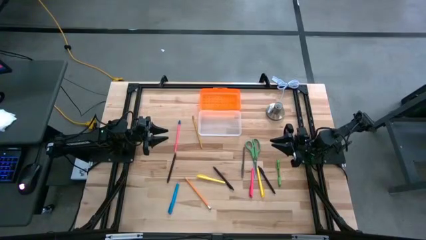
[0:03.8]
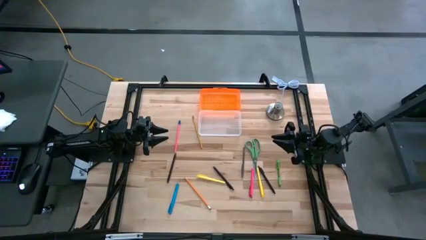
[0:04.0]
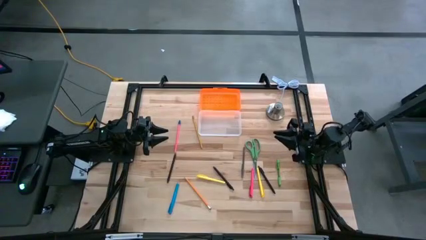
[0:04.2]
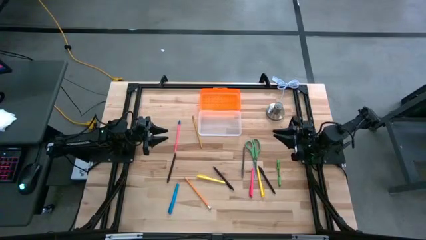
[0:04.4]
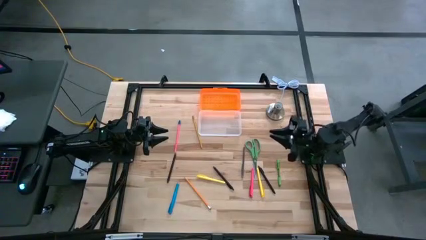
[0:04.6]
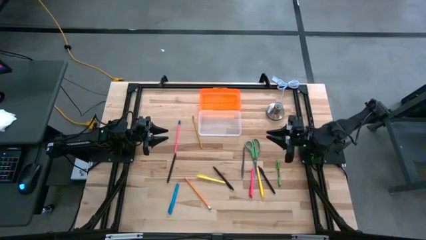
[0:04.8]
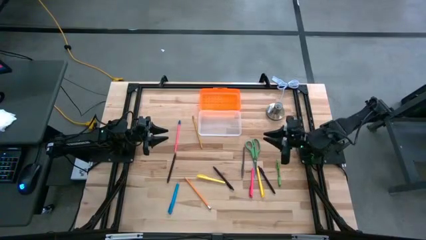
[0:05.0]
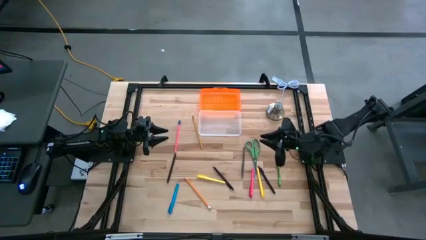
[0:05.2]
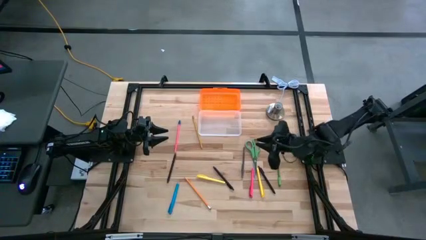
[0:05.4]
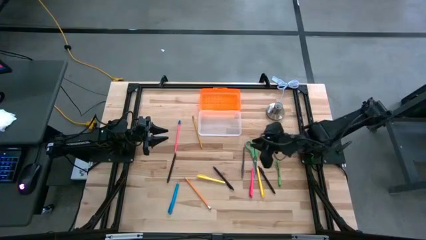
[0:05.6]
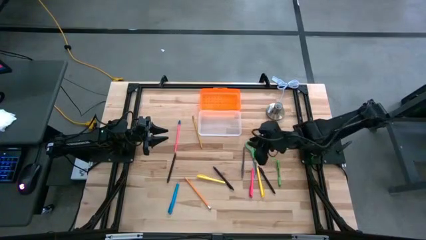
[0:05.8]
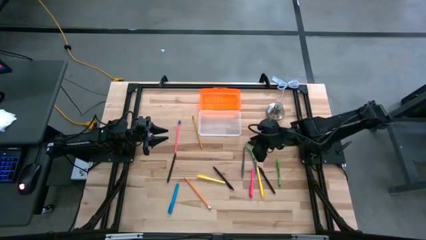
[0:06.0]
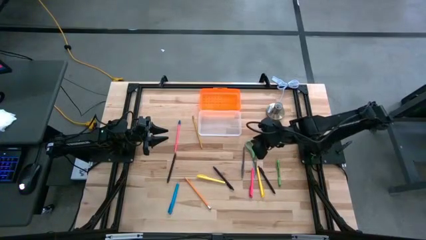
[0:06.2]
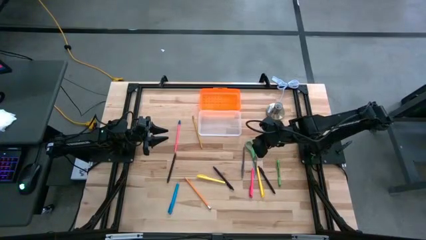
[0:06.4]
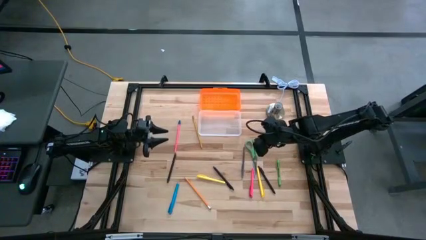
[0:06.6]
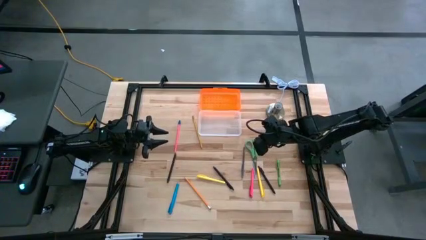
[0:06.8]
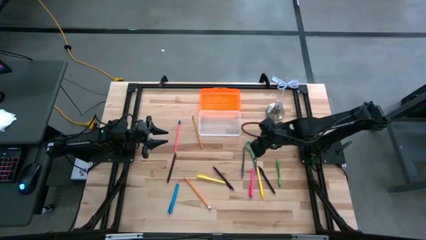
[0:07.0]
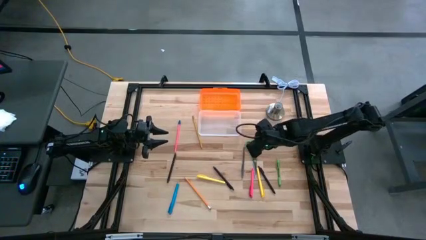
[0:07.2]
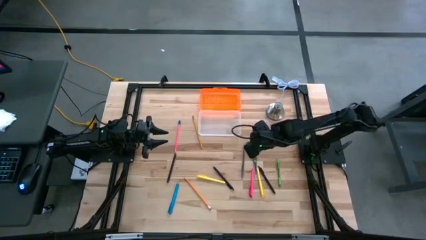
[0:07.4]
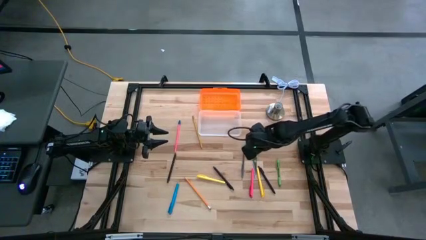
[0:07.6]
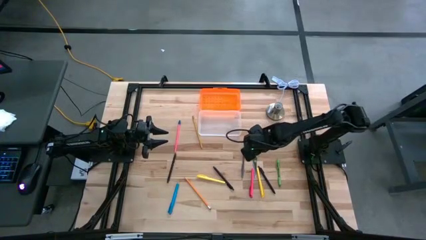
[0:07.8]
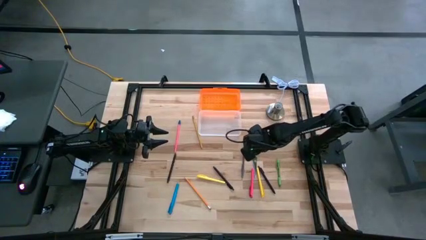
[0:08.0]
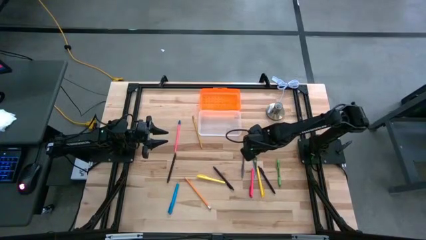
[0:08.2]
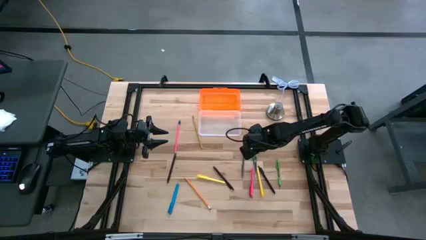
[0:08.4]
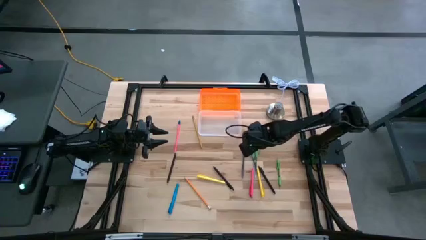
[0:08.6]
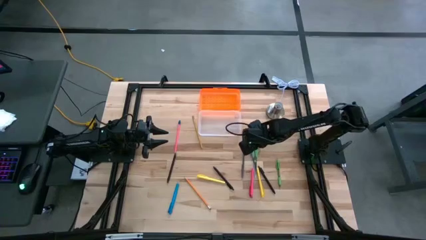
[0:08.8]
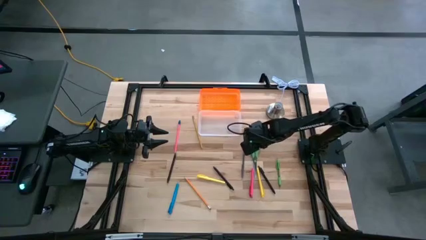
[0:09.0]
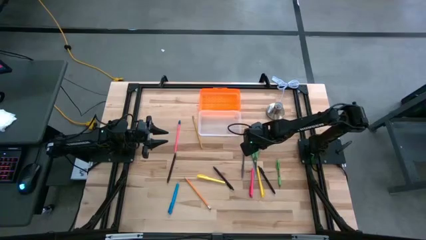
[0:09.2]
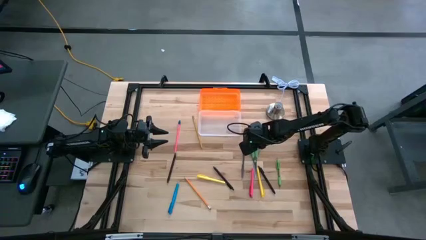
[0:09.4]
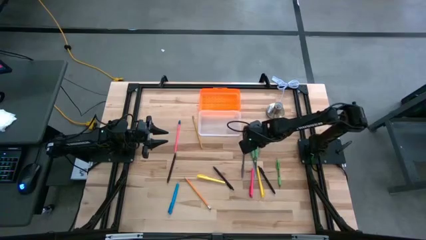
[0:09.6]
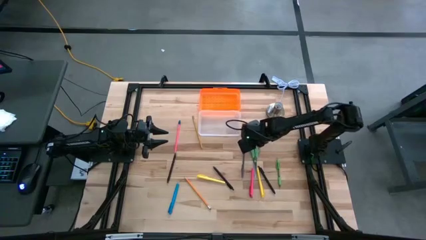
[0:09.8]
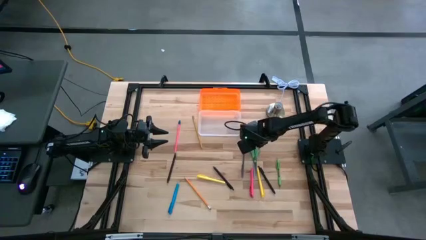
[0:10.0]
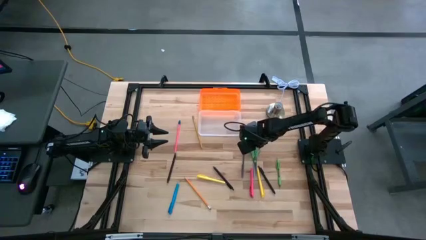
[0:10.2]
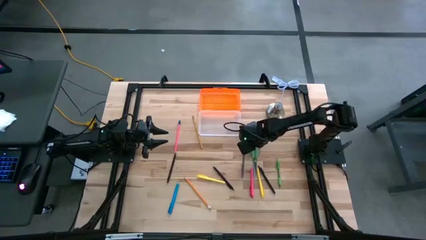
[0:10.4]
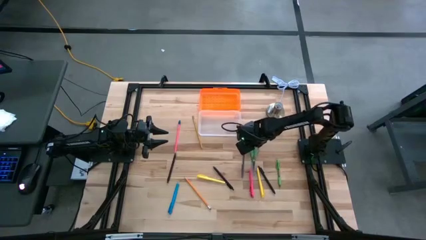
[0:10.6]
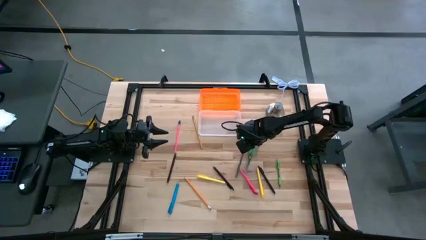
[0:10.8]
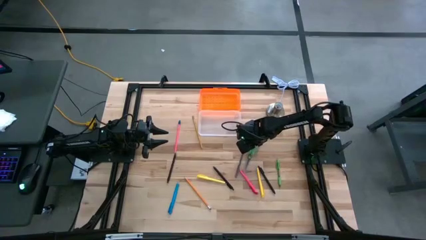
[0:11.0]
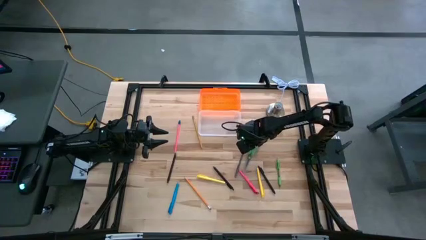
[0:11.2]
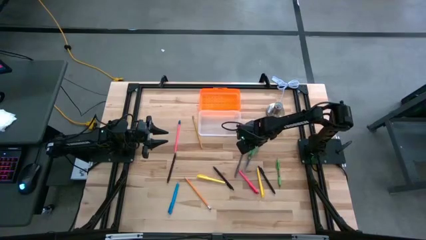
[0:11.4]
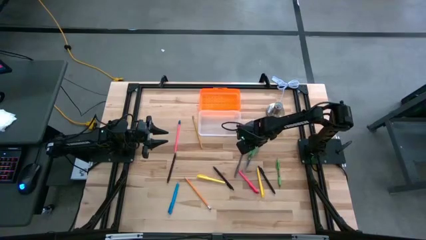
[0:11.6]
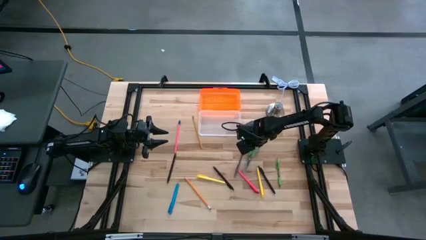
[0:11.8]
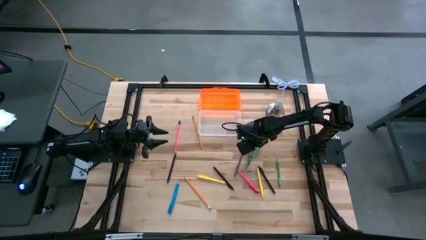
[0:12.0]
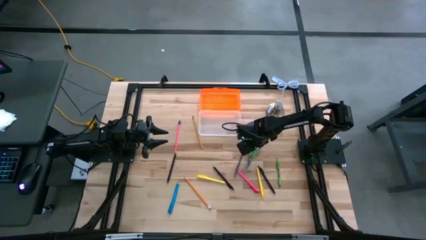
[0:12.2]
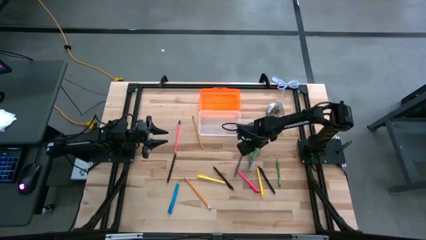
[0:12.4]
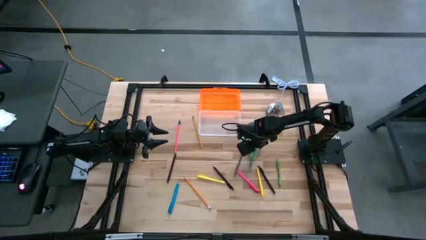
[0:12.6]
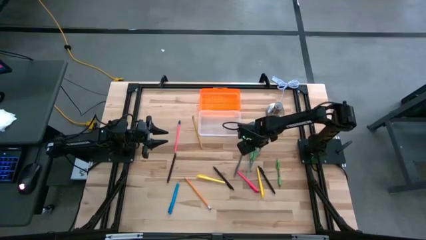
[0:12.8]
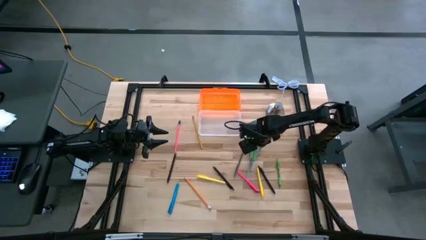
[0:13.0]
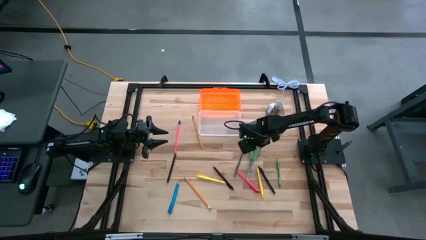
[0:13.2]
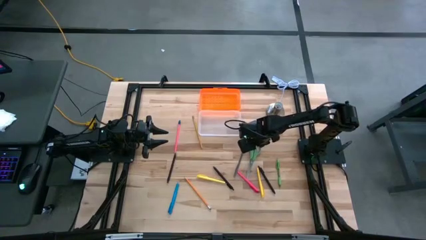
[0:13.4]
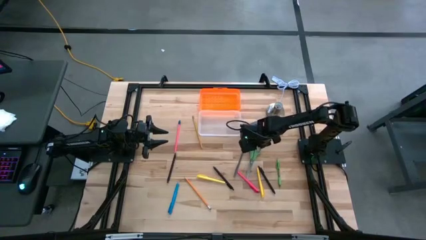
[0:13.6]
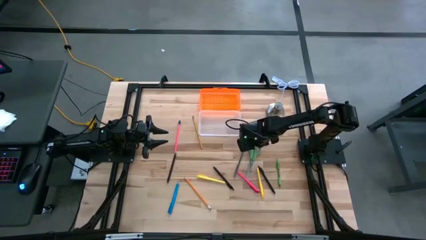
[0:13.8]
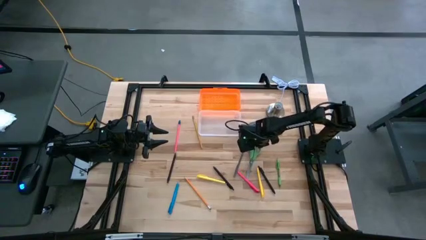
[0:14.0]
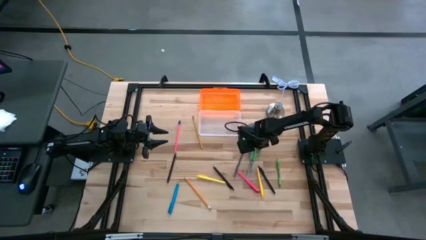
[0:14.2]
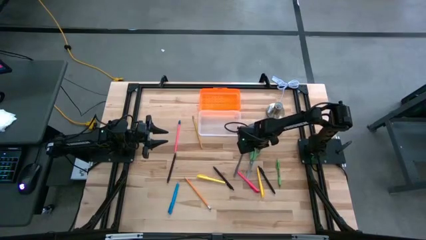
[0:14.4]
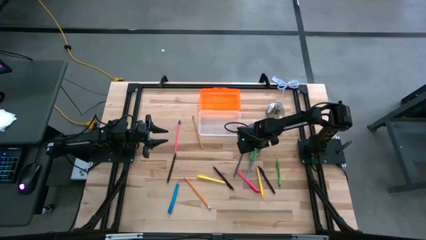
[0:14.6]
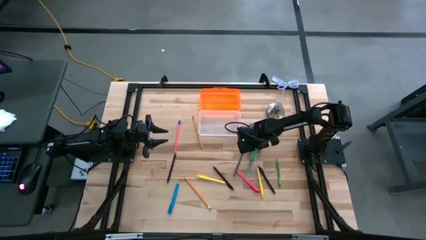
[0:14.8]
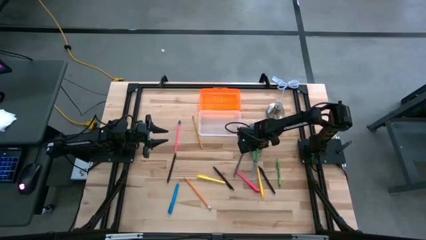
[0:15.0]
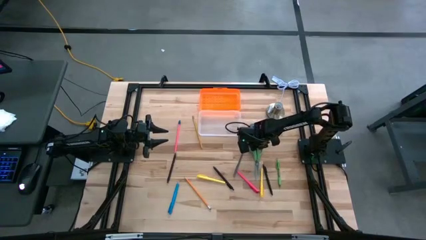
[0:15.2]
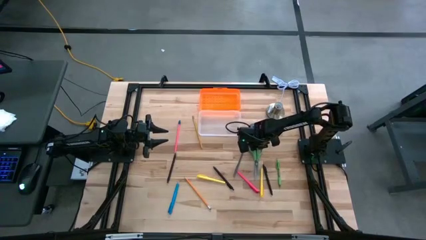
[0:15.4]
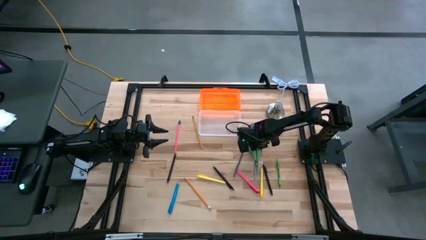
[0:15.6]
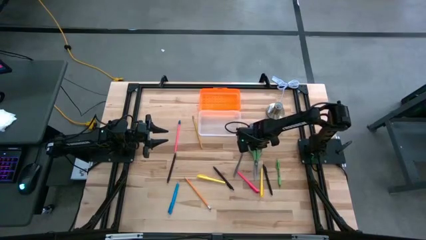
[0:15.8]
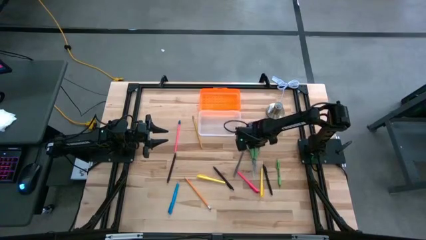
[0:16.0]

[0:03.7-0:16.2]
Task: Pick & place school supplies into a supply box
Put the green scissors into the supply box
